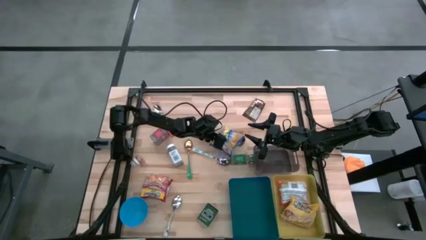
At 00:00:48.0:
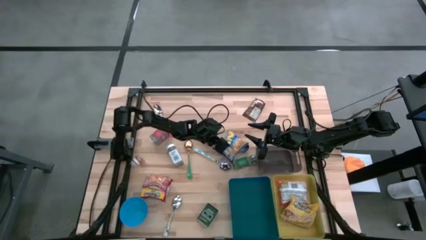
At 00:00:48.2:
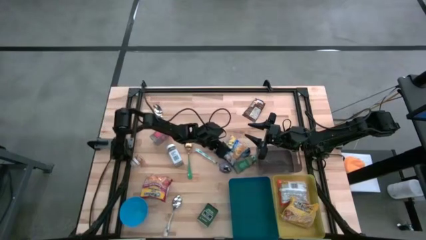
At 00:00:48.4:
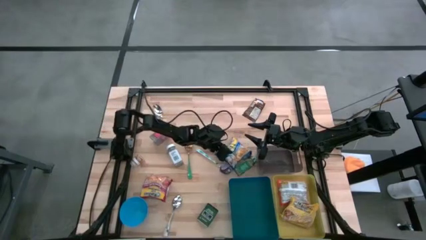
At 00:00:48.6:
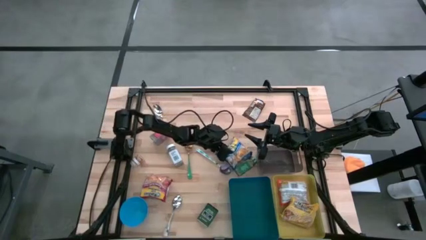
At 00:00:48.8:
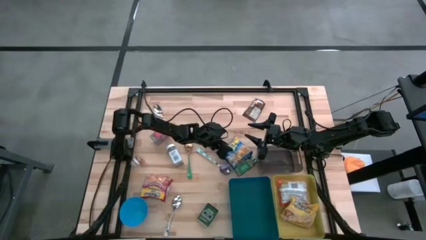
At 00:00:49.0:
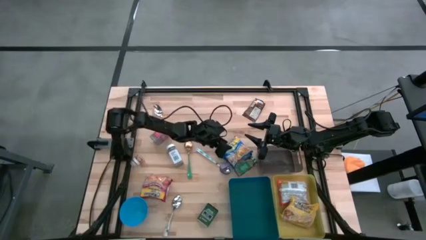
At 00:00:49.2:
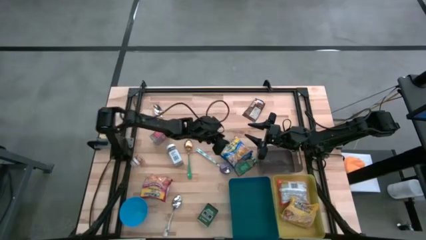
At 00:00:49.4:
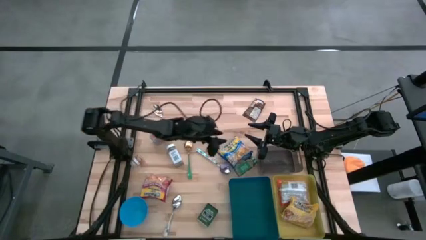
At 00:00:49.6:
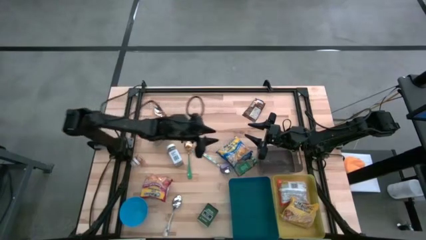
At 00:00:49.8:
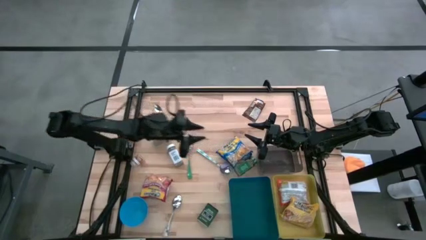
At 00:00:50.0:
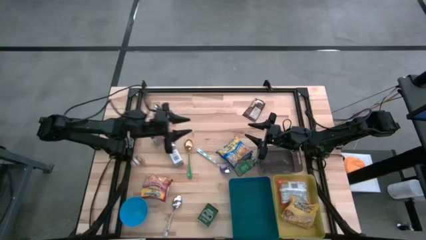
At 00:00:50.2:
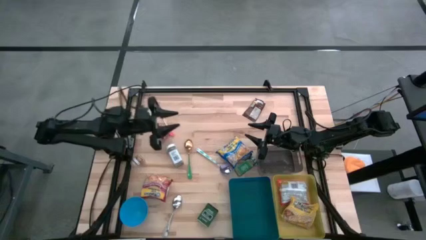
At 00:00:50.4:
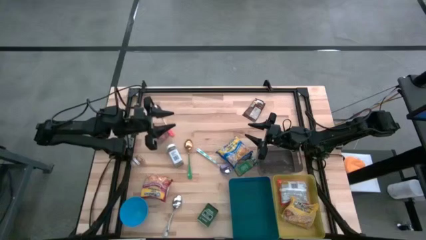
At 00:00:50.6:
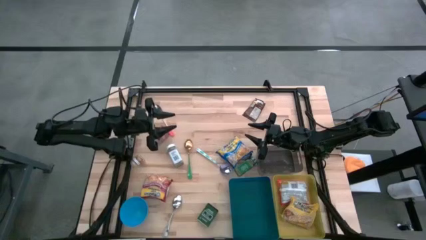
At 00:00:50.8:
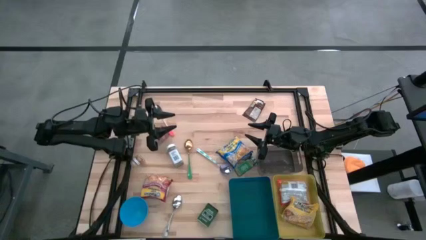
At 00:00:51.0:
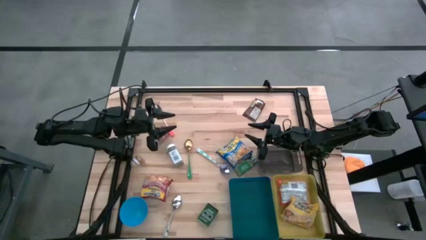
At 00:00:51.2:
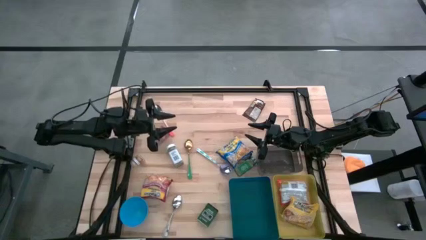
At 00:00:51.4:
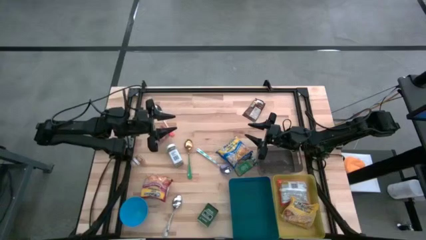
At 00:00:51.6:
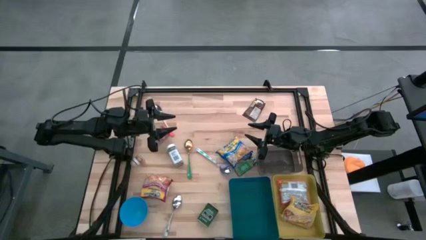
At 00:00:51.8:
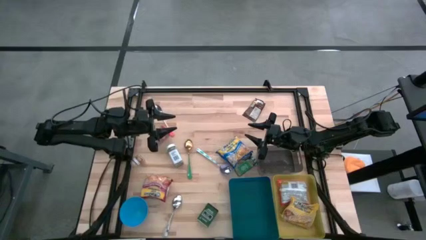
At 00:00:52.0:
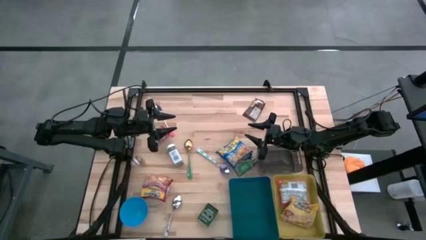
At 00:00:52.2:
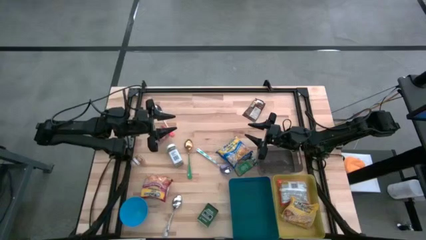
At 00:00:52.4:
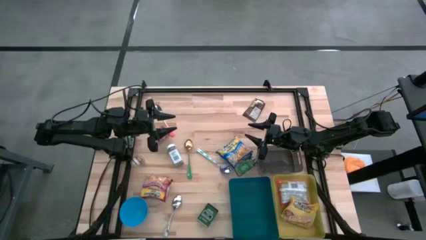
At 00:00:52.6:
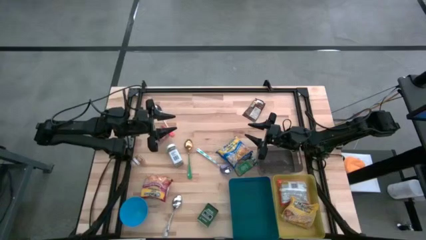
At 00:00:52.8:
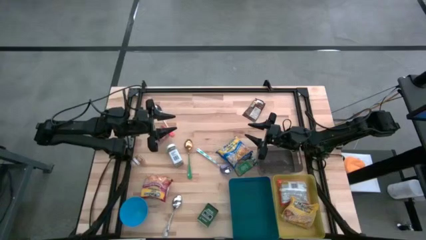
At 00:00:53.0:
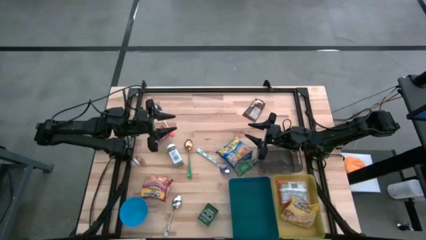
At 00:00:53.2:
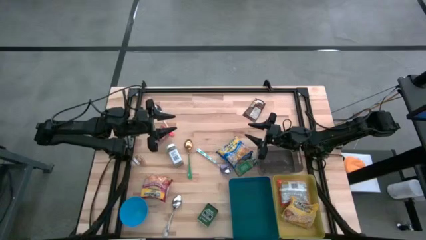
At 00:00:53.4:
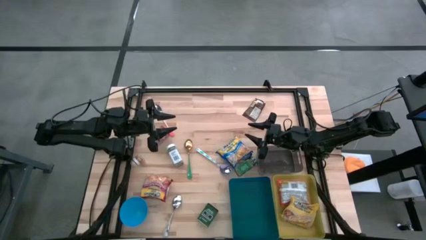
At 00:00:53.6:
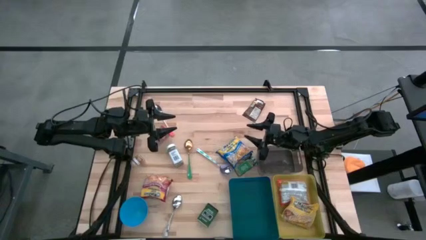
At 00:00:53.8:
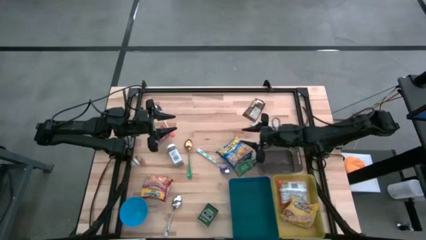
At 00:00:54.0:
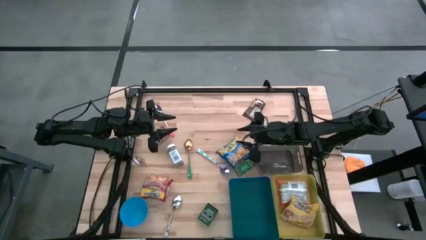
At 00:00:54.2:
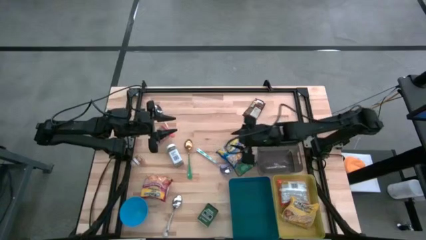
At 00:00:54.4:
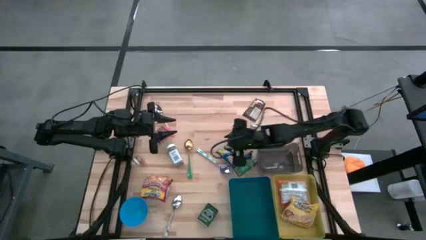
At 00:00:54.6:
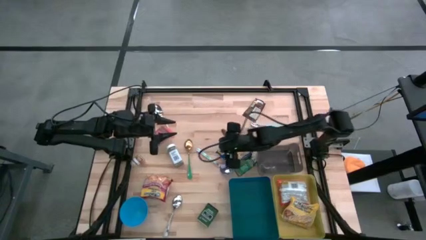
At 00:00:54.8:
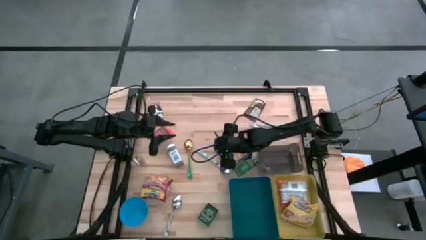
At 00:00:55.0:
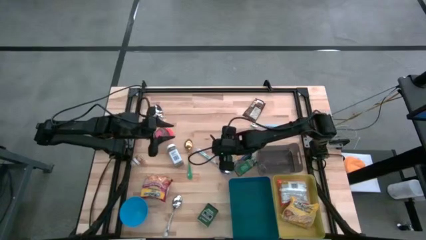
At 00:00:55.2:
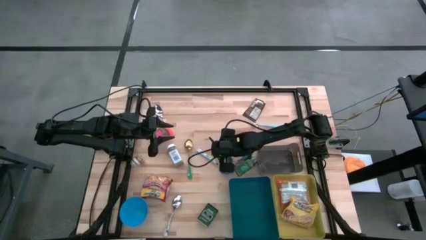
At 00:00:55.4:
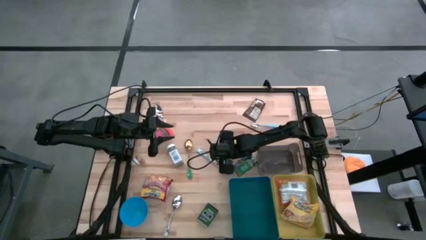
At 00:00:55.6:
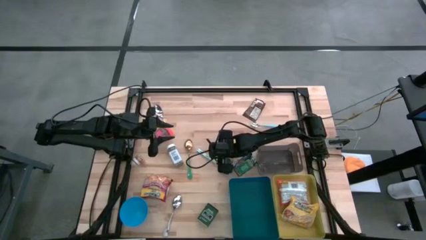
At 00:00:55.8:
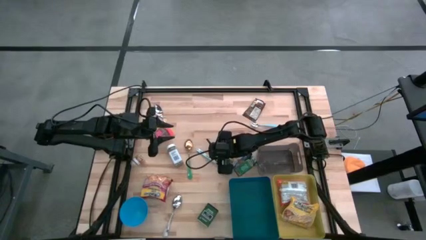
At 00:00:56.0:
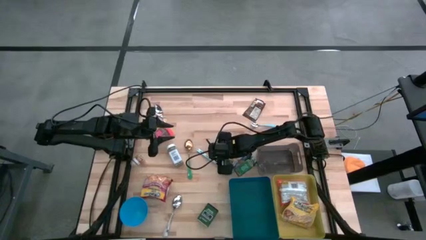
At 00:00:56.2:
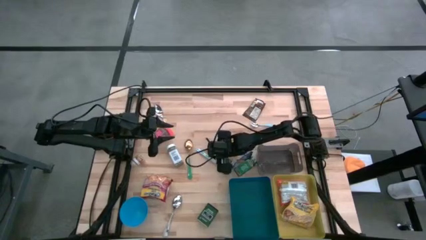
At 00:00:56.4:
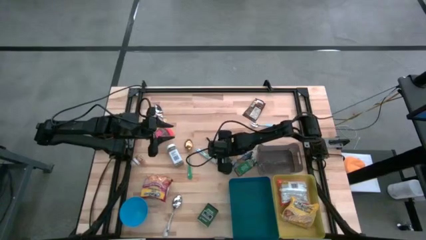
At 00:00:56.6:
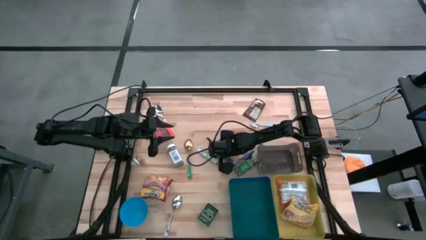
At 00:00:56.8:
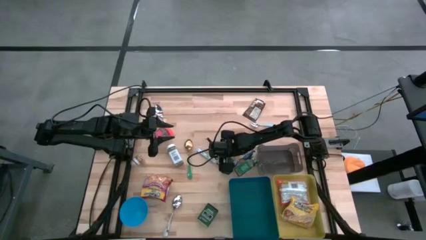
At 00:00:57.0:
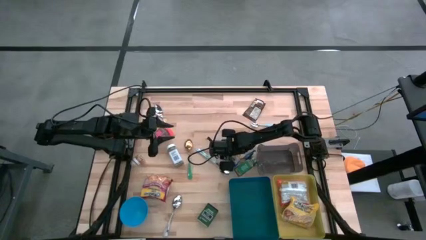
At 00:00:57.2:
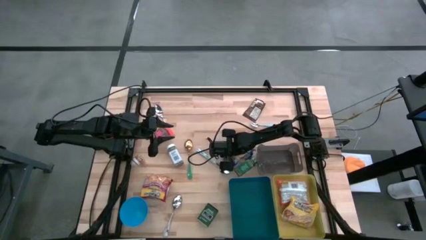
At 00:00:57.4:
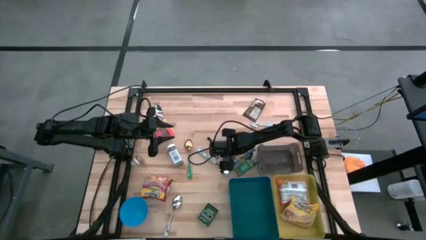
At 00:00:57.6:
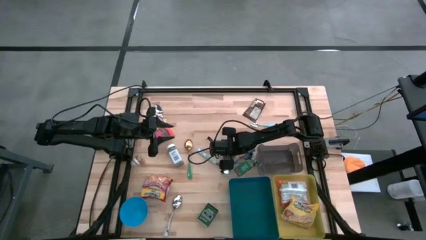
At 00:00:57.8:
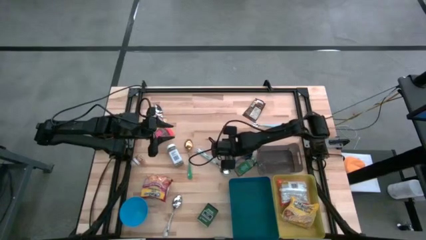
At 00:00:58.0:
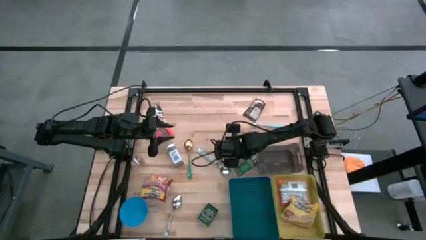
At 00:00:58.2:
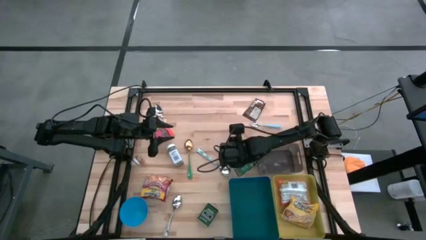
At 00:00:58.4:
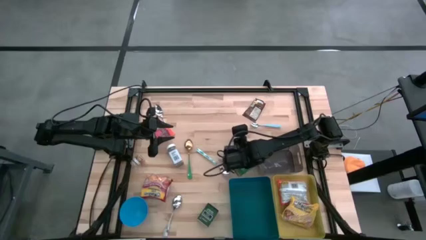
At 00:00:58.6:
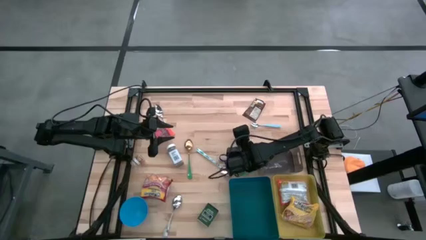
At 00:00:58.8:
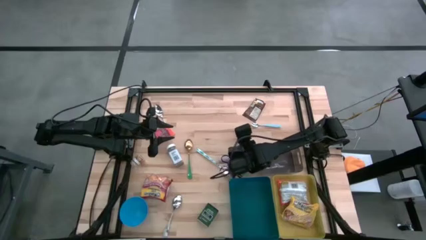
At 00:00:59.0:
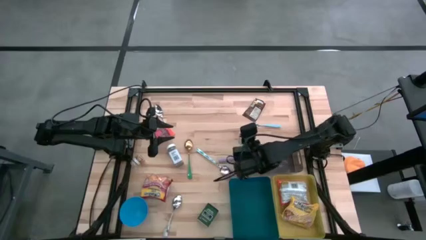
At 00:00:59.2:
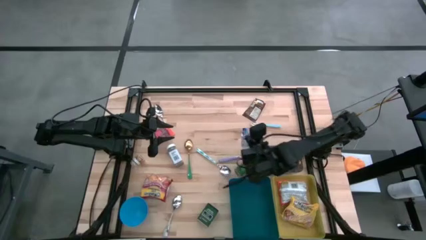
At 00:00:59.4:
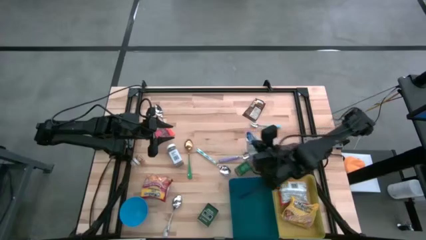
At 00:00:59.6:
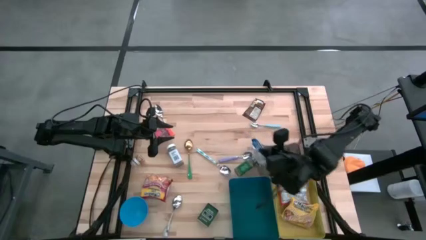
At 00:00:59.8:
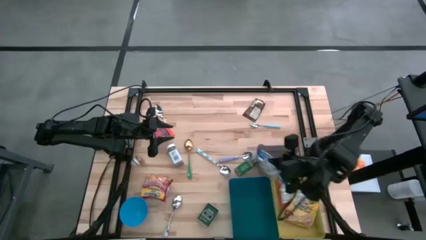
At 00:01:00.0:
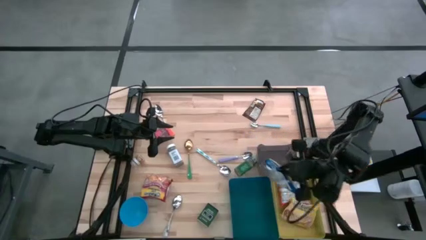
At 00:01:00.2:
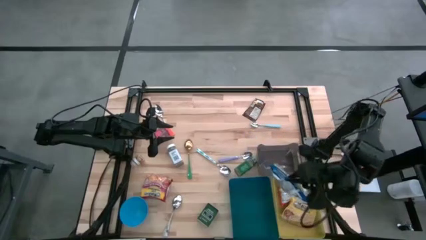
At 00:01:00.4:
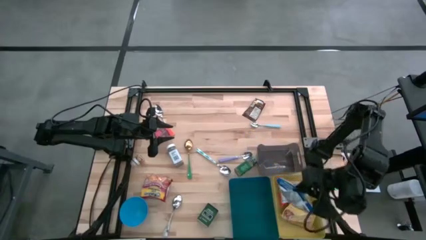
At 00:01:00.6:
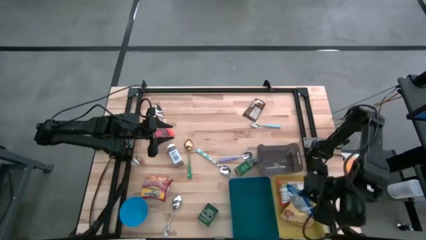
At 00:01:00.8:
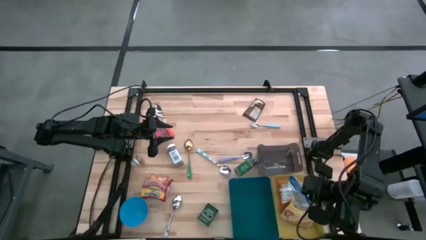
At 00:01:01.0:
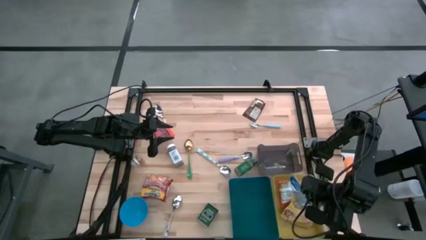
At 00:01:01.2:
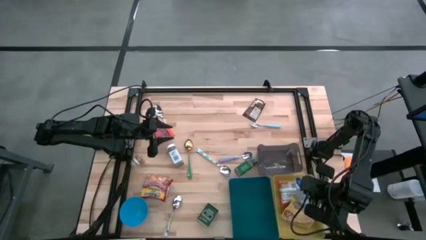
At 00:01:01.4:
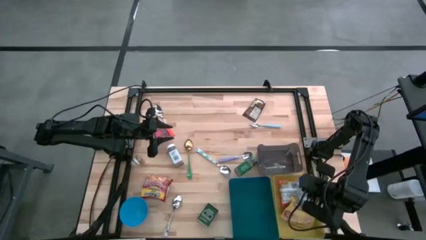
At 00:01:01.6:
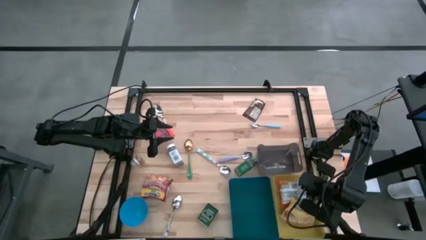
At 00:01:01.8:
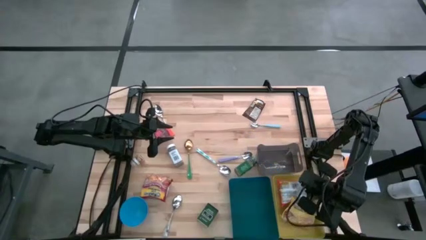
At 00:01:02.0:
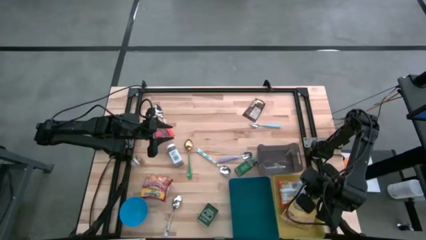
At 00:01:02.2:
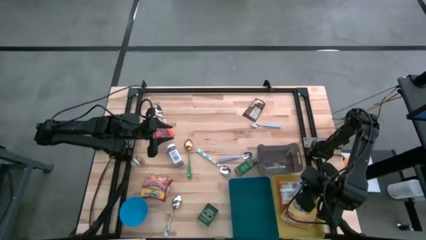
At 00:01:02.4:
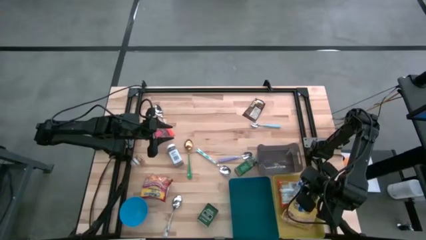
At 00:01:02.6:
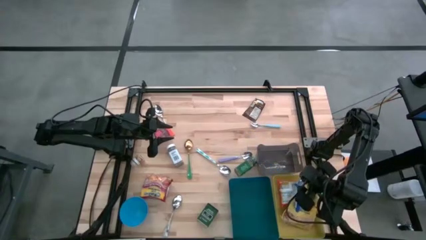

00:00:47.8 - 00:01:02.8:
Put the blue noodle pack into the yellow bin
